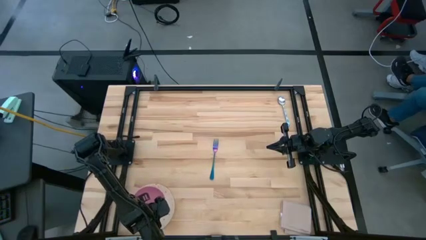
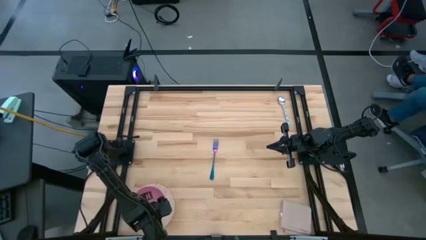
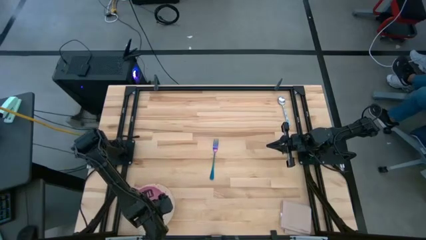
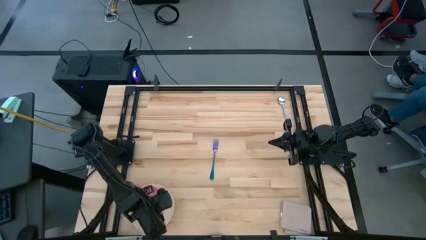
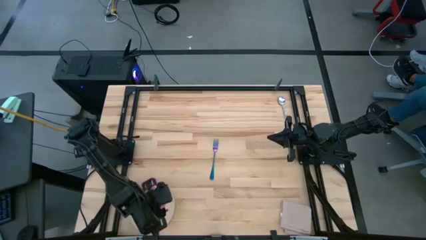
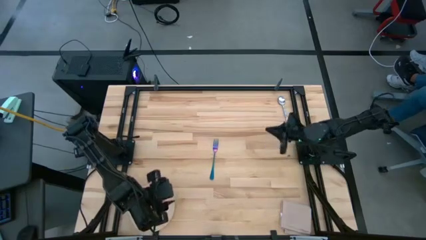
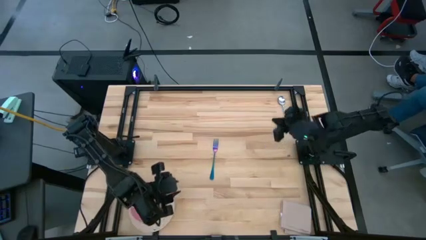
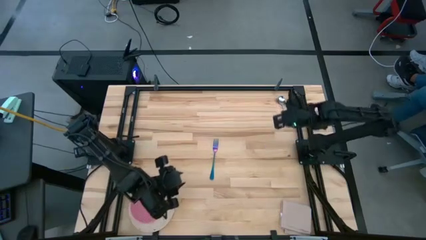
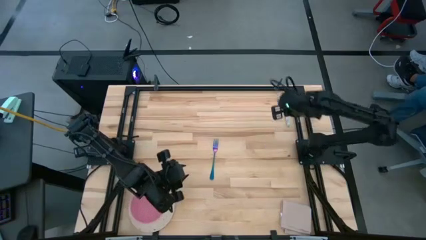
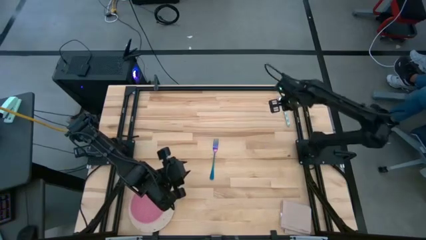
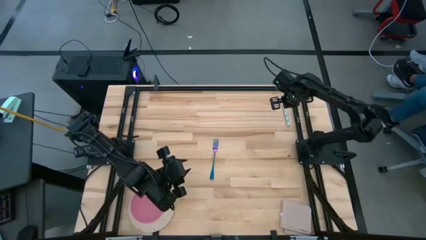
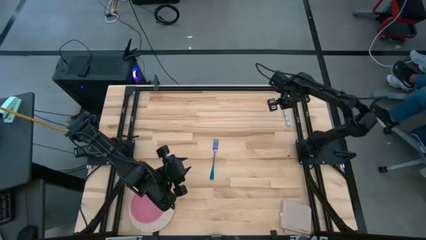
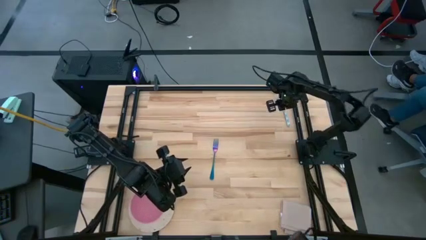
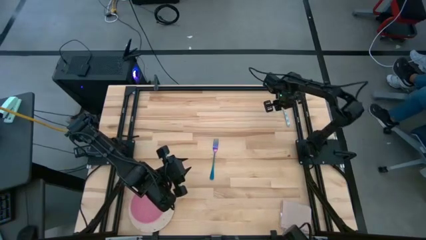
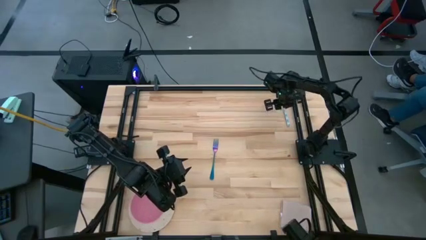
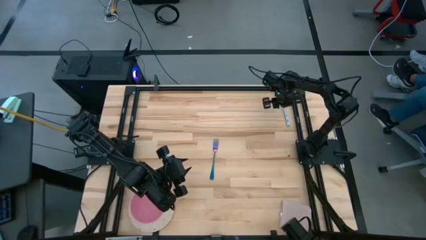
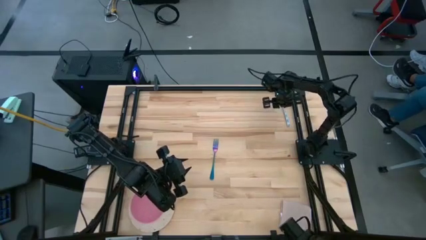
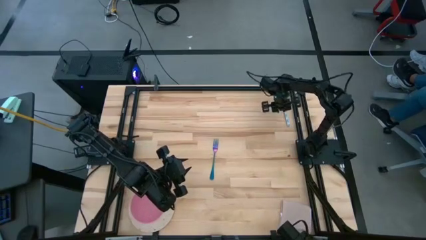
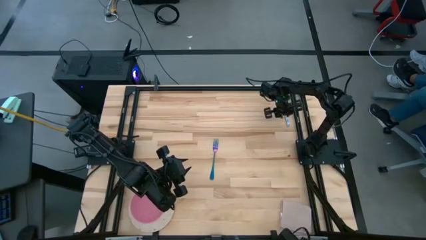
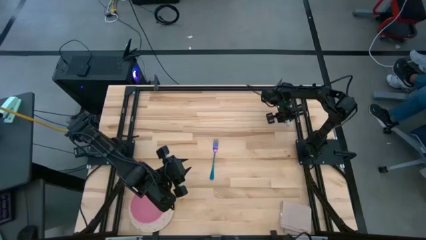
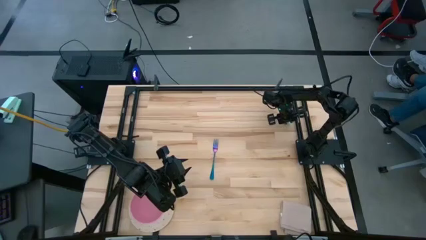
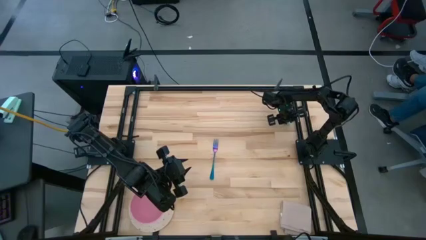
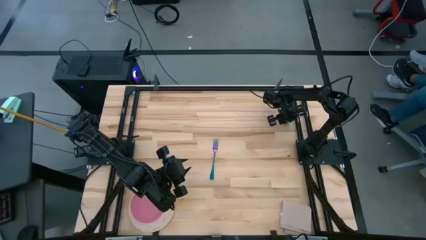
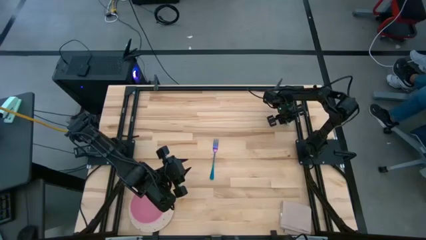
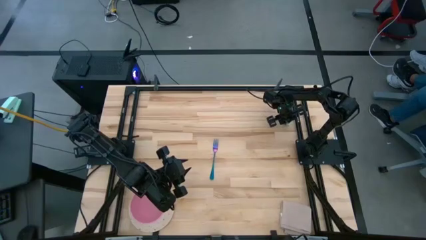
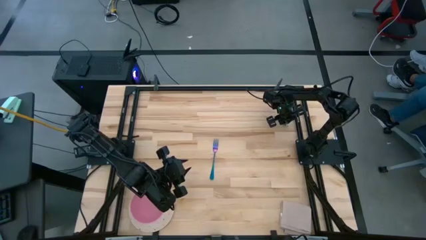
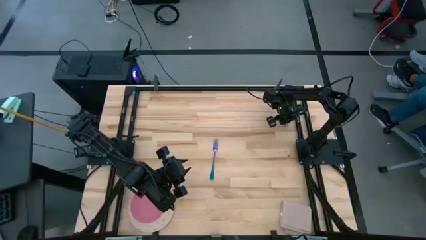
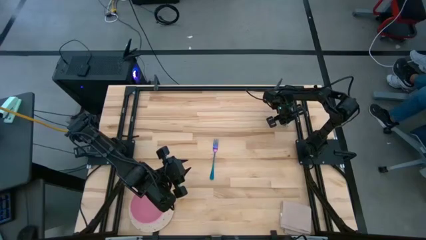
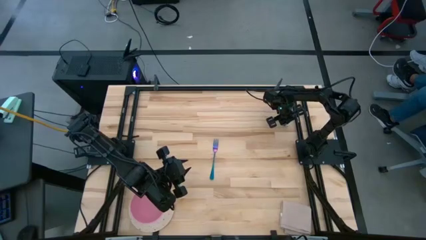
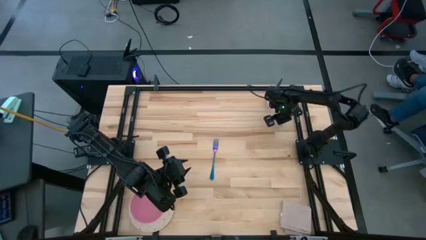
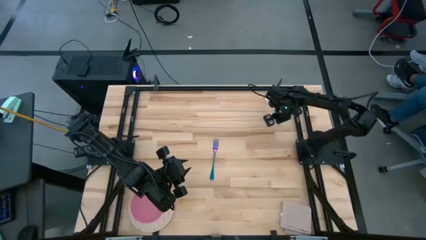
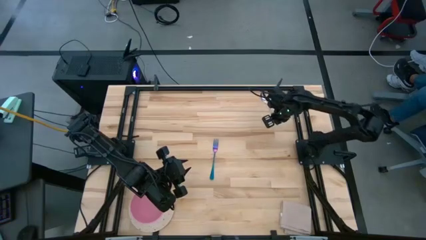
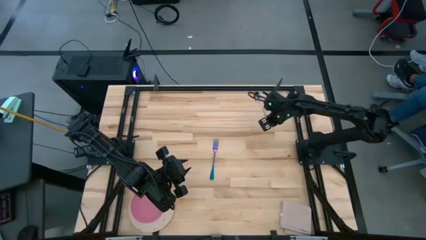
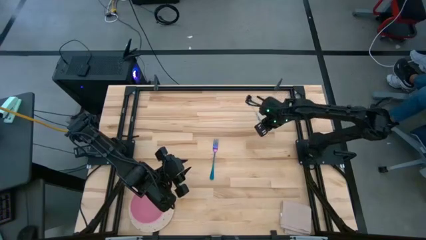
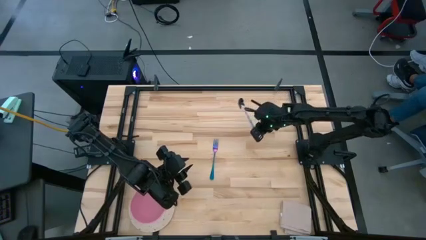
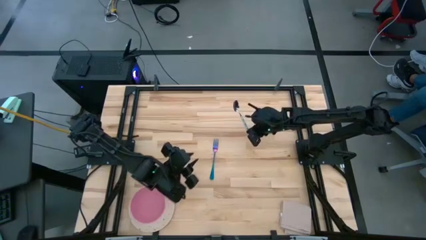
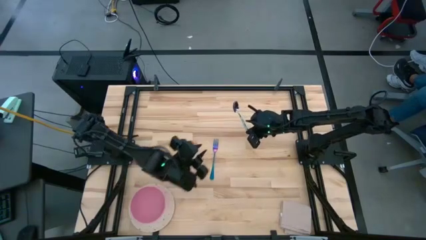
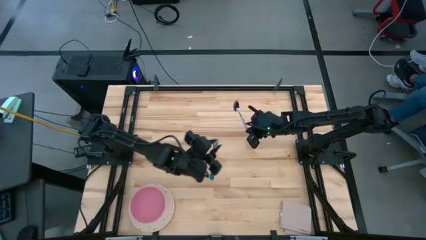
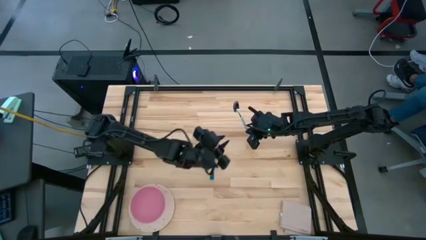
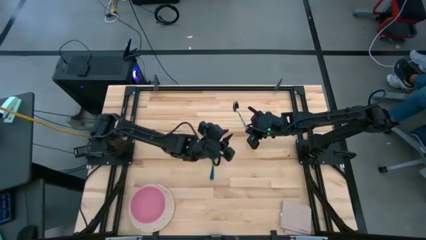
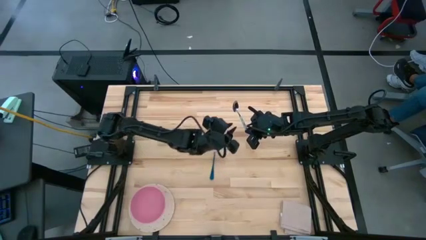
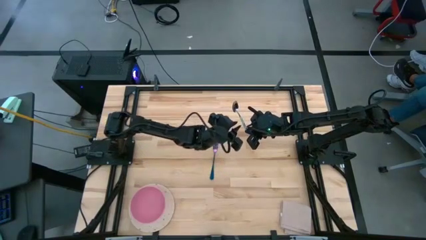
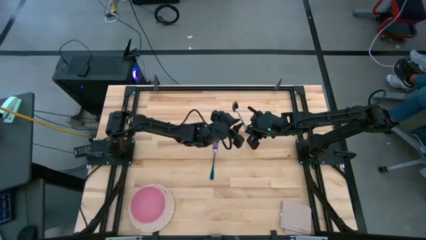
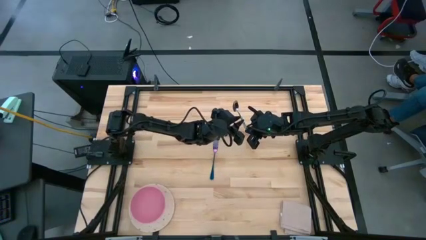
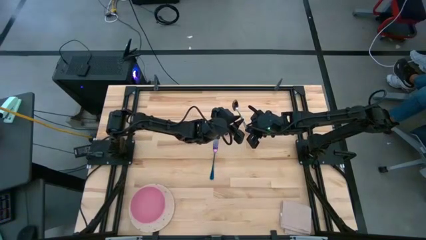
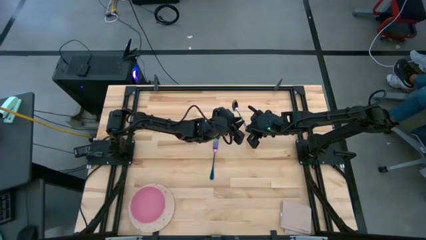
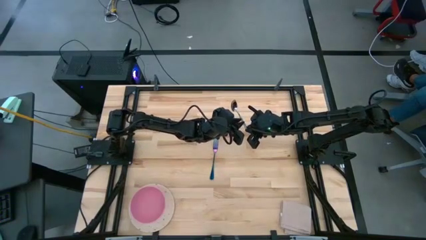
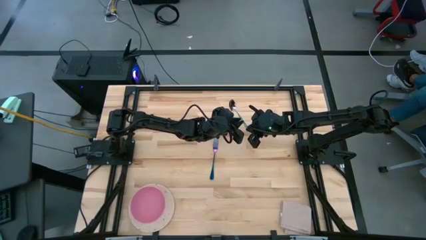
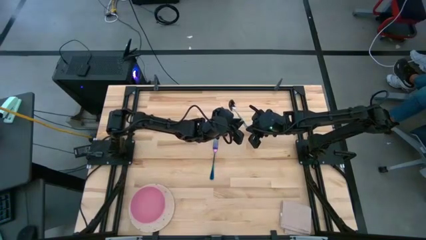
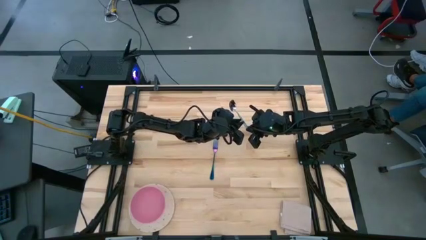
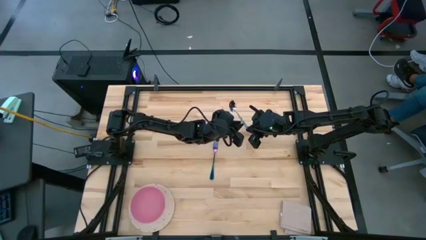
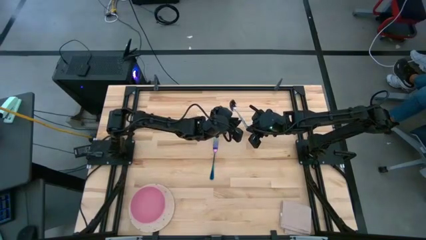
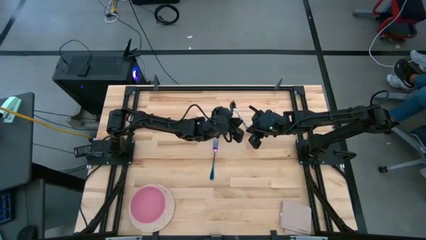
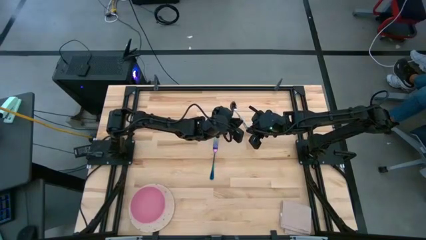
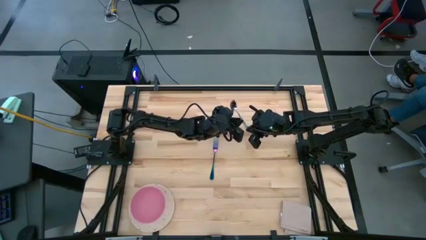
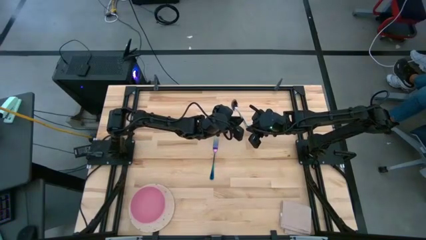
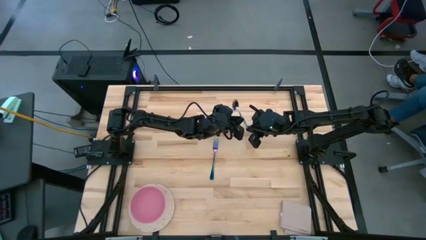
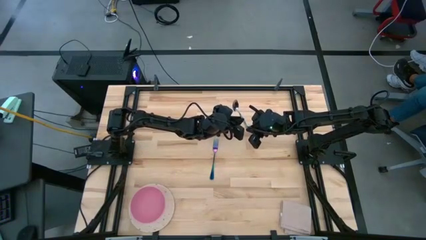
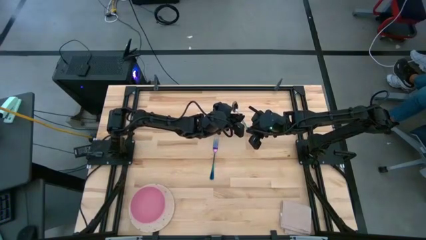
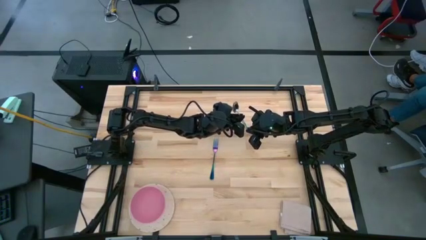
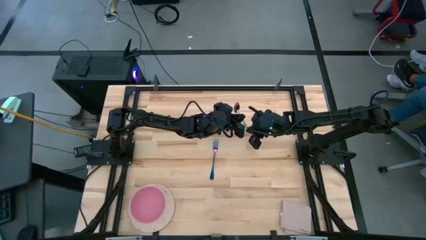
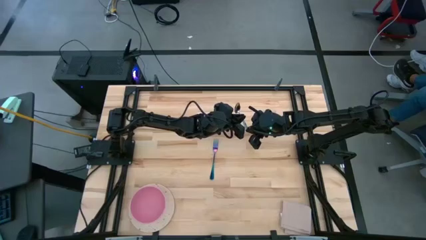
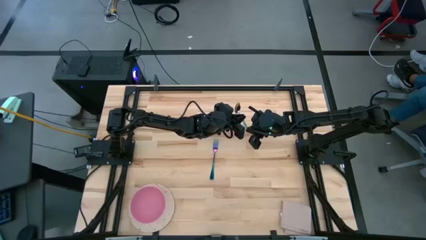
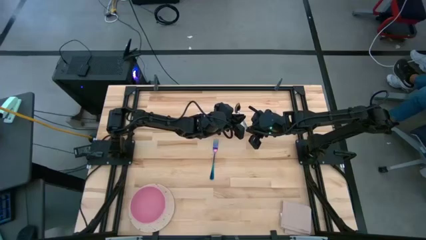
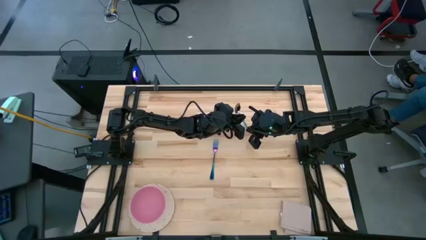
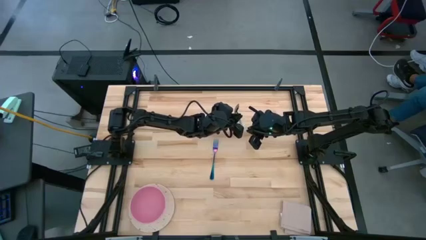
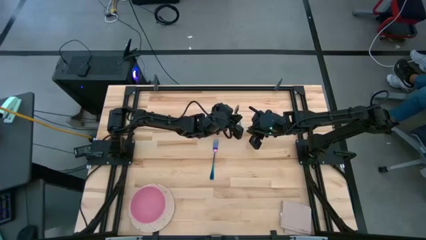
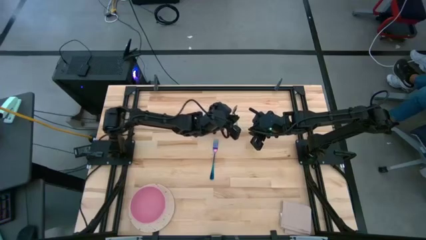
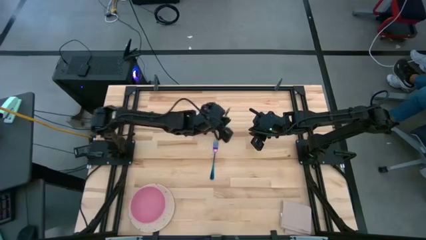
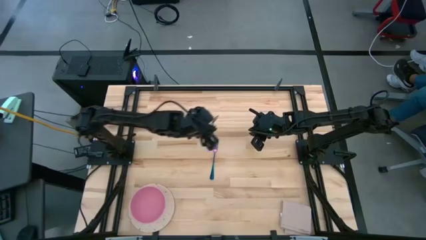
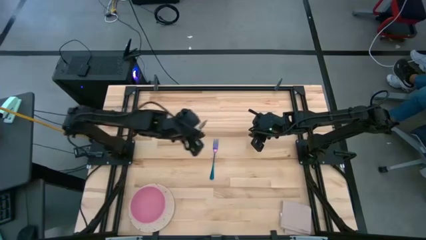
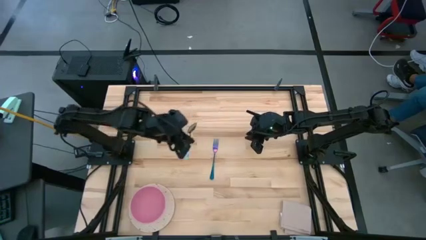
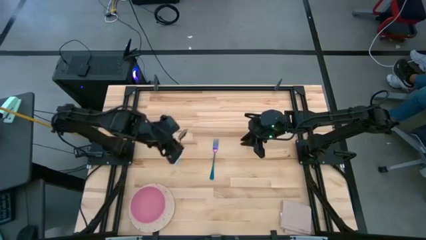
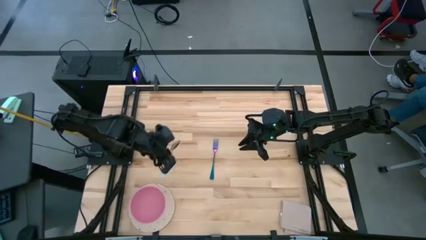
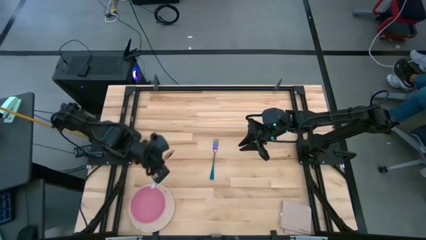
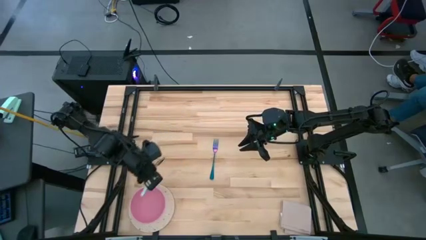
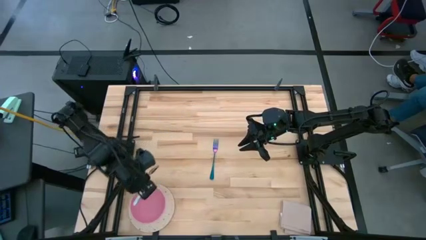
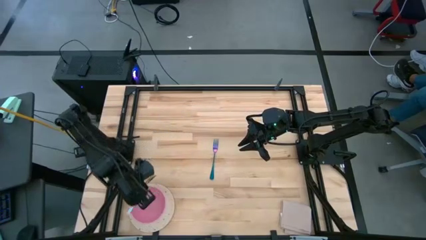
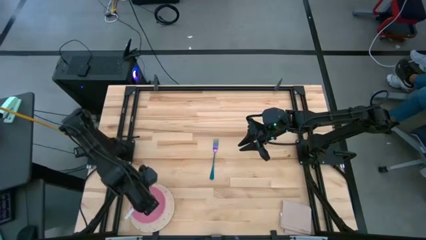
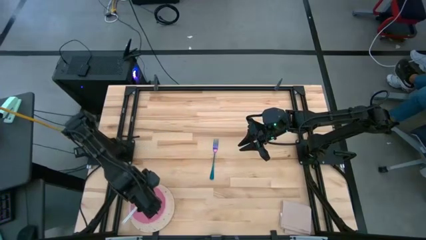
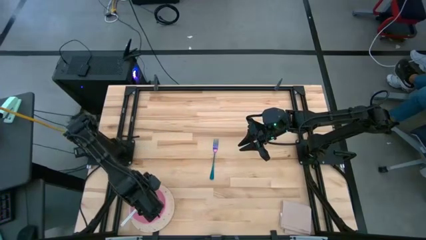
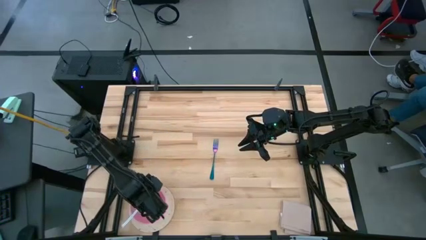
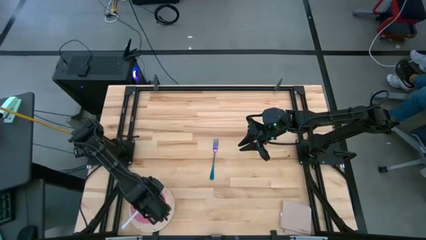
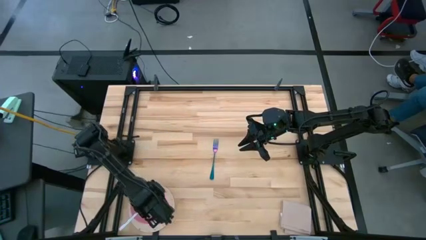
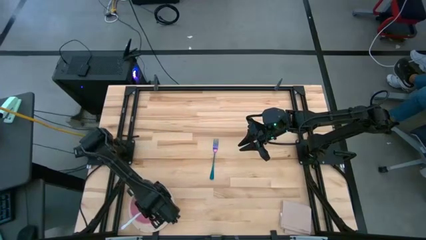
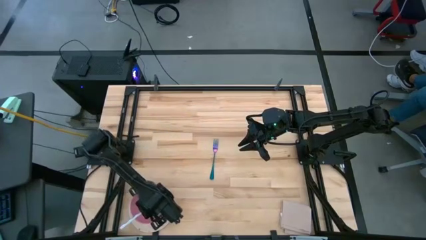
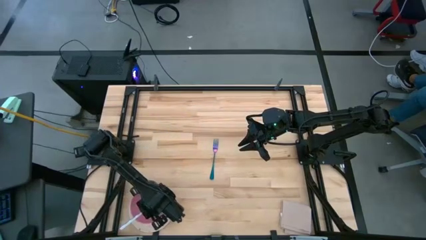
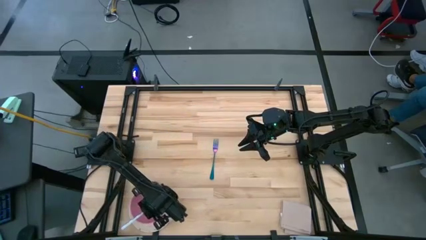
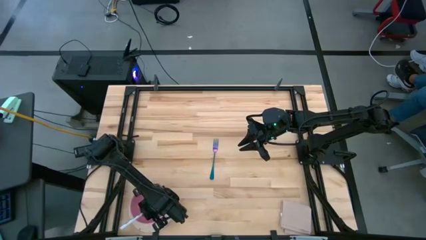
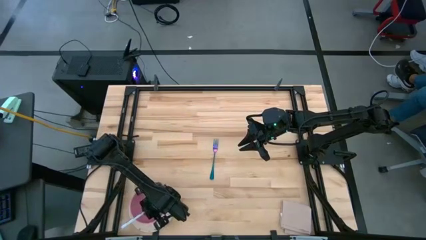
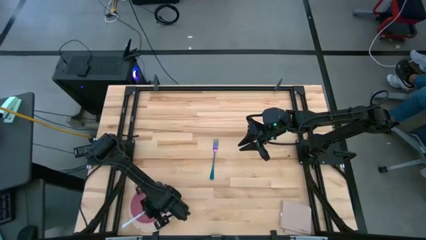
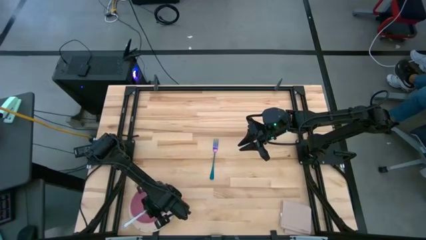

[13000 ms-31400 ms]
Task: Set table place
Put the spoon into the bowl
